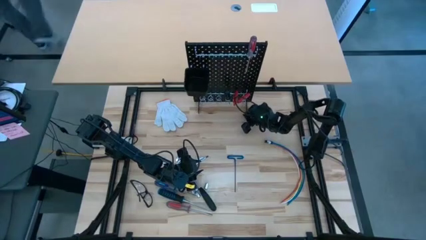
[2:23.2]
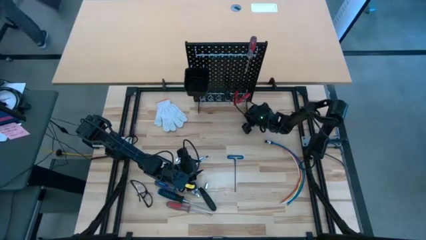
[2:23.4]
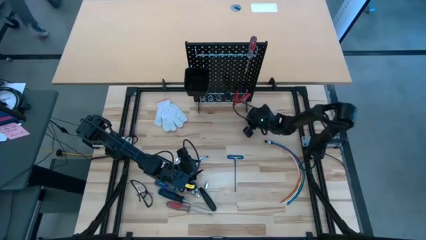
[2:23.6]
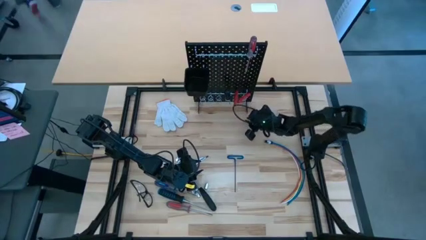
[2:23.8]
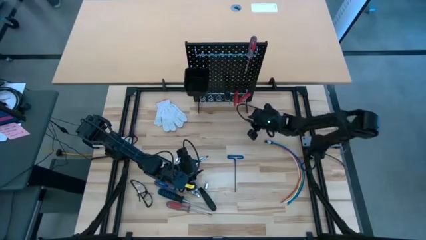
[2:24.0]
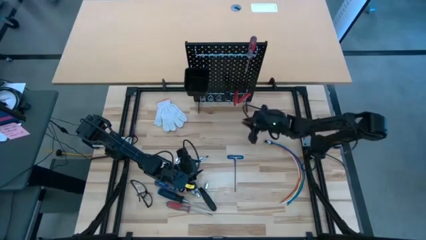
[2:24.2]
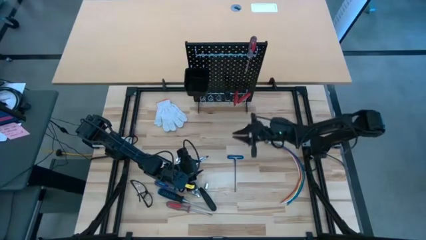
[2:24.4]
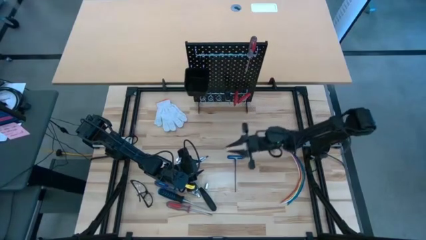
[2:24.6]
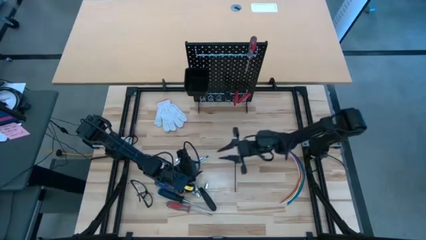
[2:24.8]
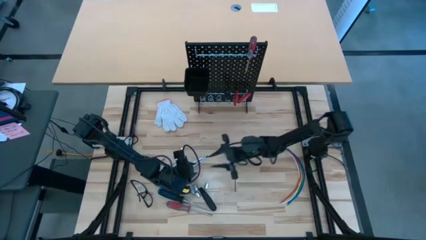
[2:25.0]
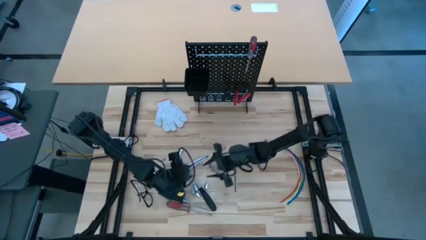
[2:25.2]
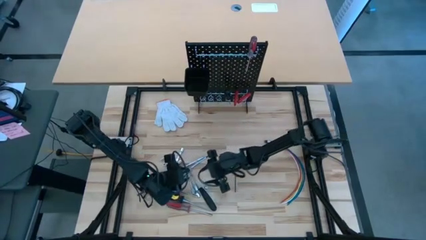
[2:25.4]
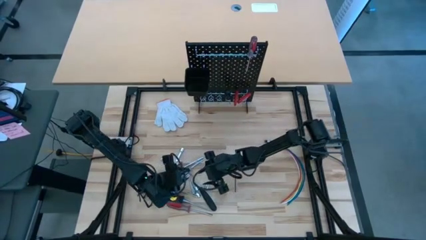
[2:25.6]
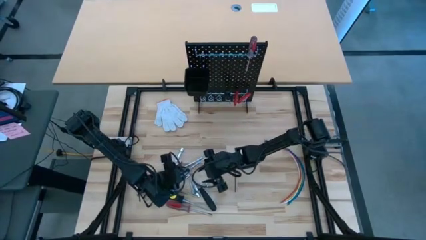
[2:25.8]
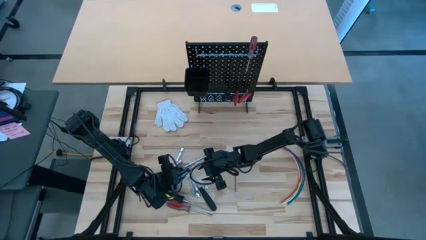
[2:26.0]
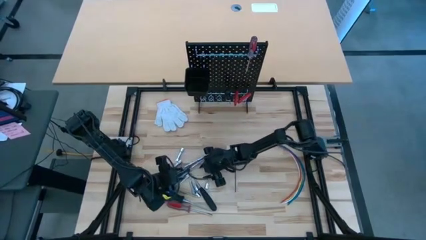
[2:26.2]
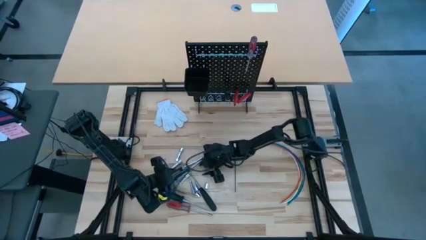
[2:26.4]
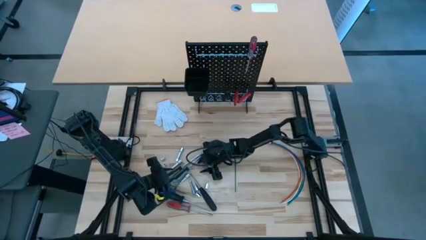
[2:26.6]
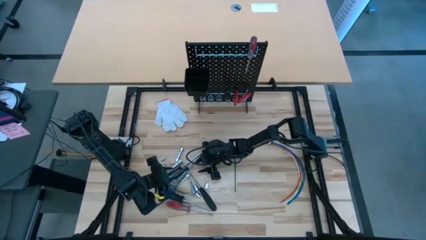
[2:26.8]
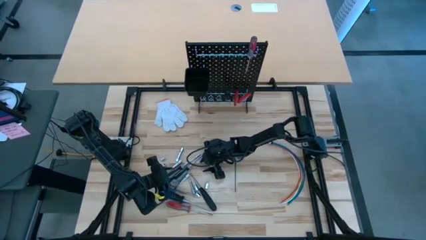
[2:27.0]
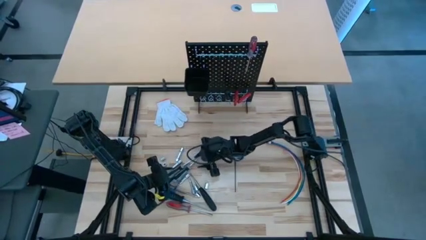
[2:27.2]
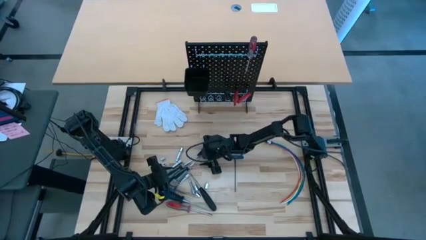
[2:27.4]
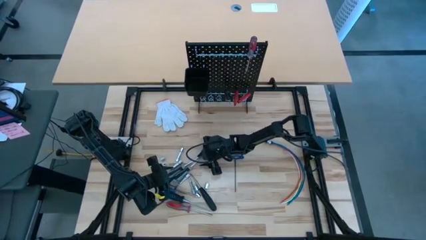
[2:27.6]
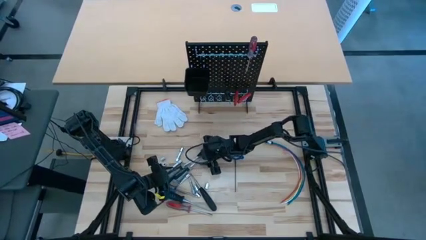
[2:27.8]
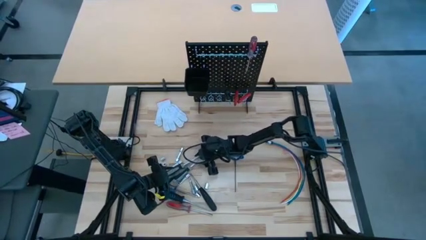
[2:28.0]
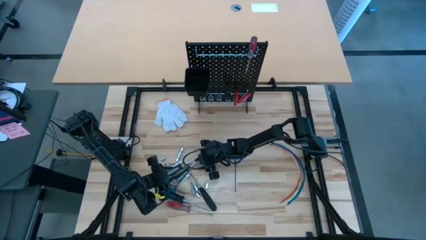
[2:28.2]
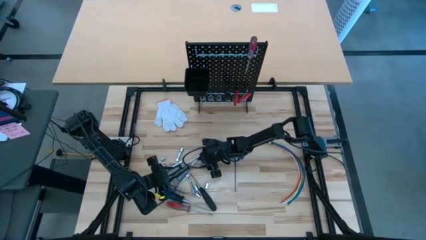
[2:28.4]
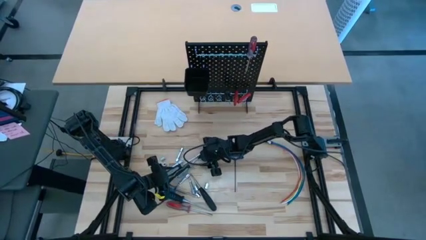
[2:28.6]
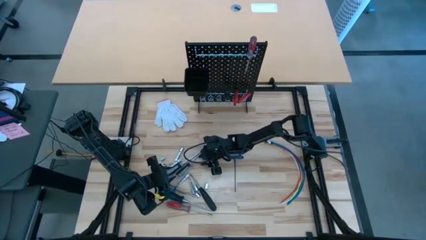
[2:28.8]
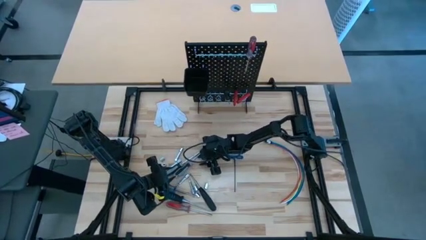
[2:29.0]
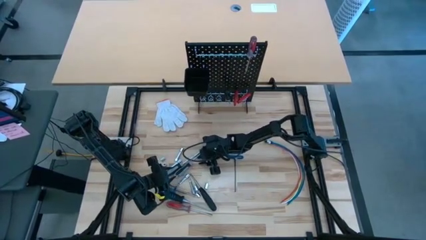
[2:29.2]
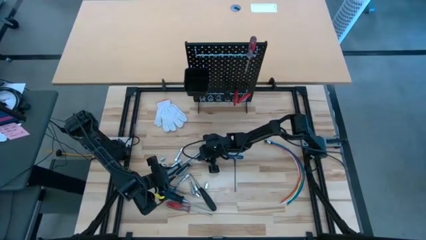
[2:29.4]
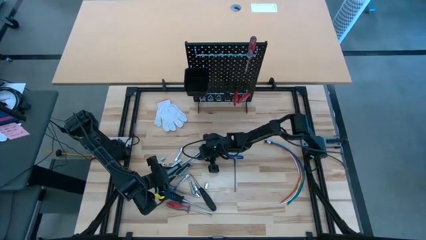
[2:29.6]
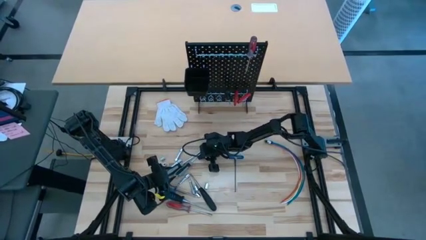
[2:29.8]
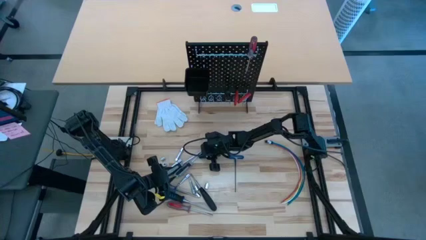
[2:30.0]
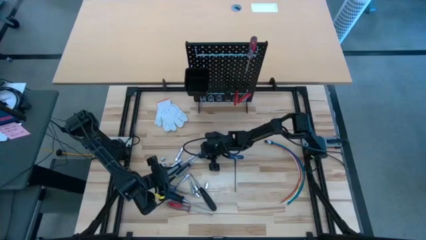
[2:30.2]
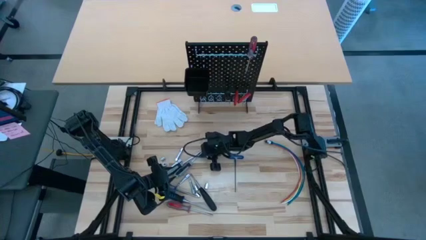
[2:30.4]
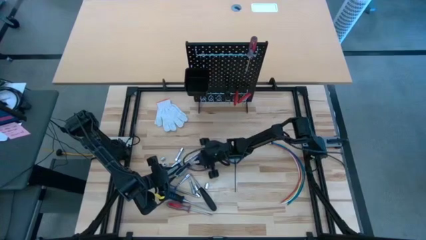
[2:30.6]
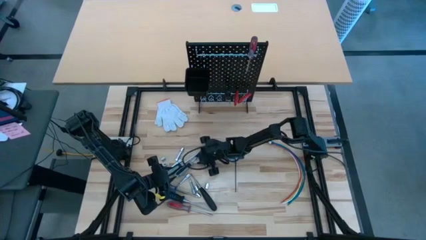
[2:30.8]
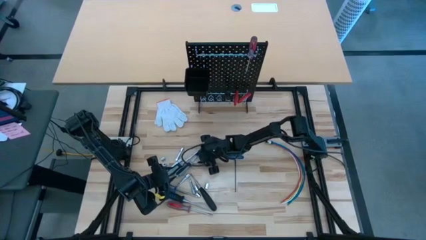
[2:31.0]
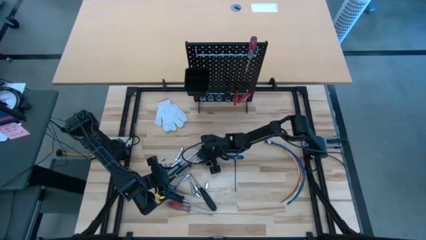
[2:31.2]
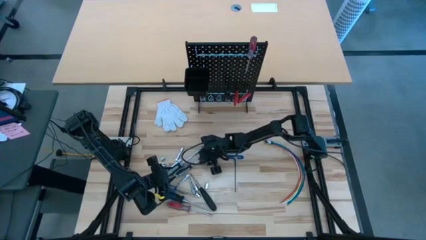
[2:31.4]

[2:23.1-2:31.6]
Task: Hang tools onto peg board
Hang the grey screwdriver on the pegboard bin

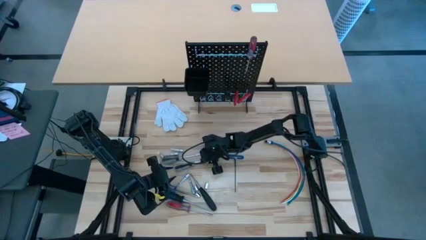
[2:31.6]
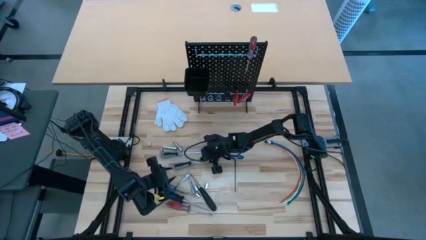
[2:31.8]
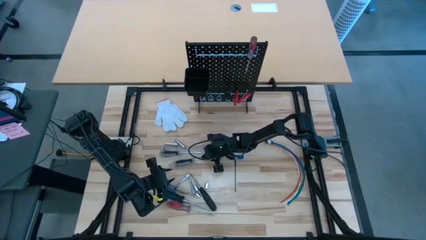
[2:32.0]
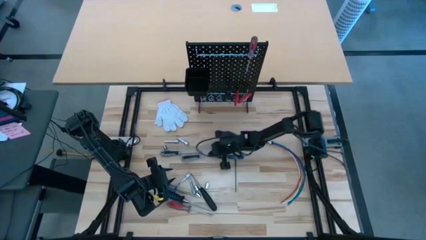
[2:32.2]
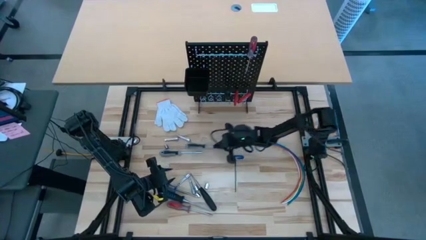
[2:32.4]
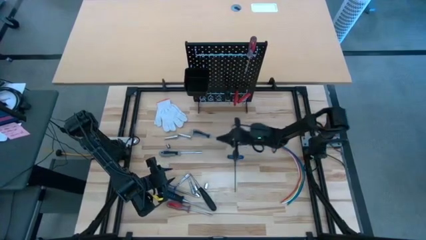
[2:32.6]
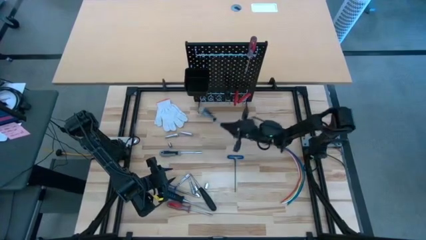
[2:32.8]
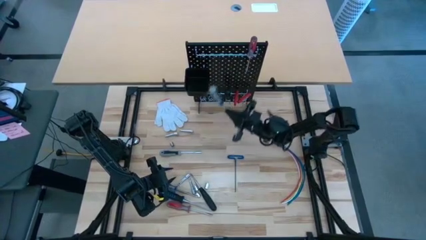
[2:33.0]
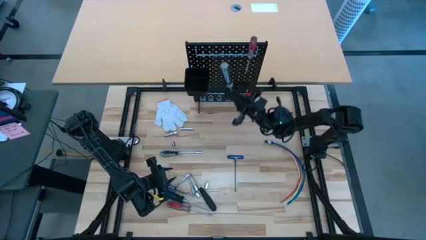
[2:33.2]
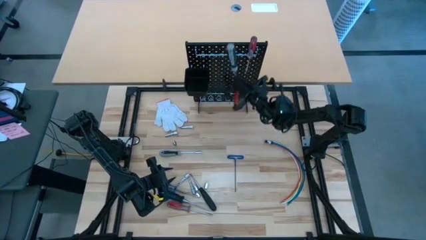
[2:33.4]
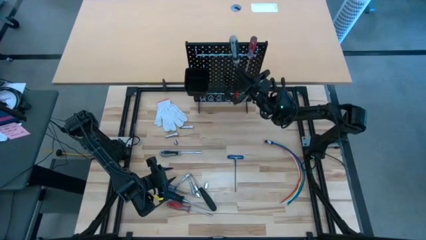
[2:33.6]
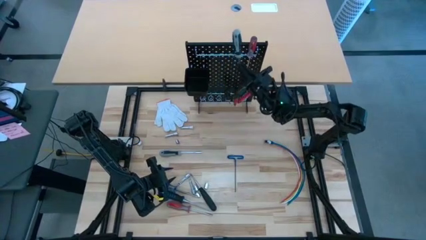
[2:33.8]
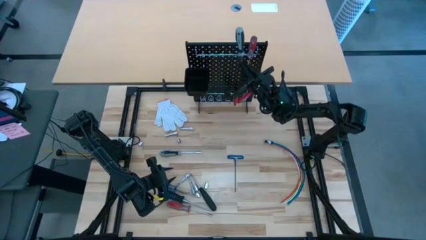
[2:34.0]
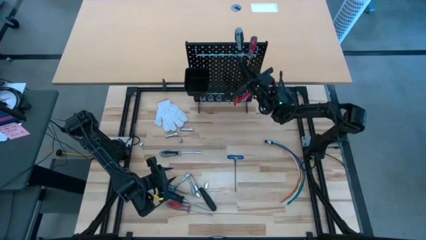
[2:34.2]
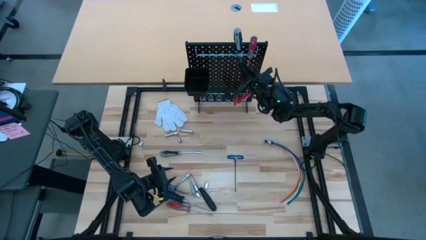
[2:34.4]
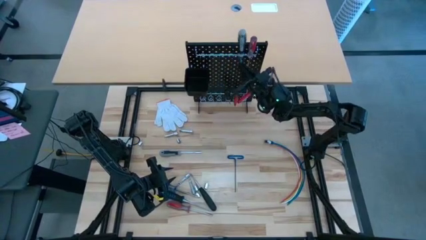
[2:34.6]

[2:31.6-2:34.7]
Hang the grey screwdriver on the pegboard bin

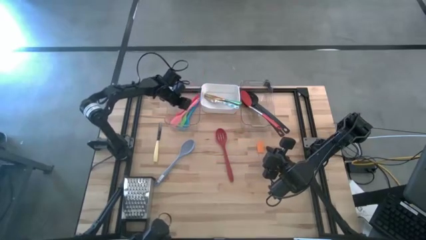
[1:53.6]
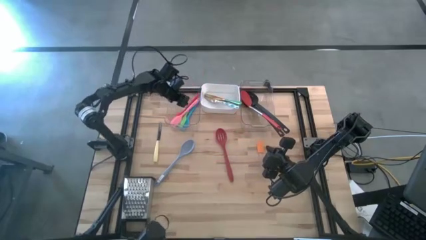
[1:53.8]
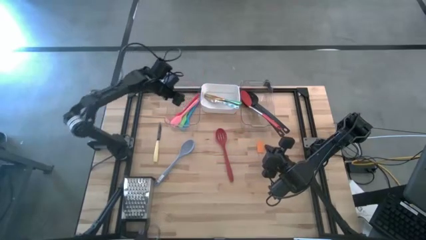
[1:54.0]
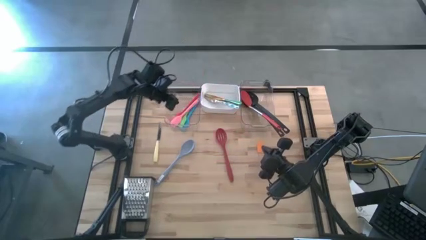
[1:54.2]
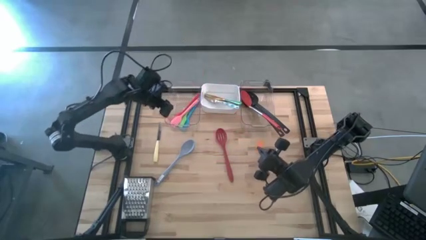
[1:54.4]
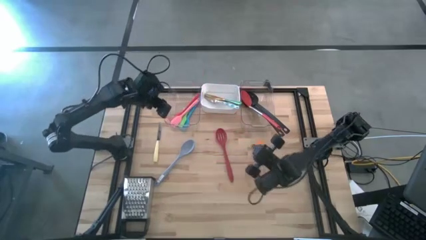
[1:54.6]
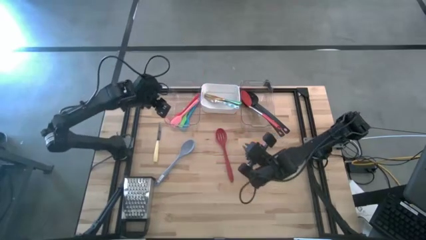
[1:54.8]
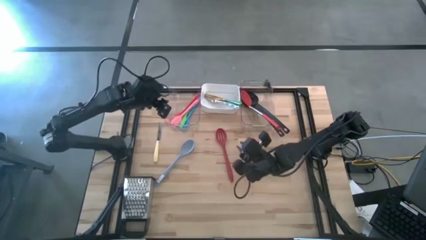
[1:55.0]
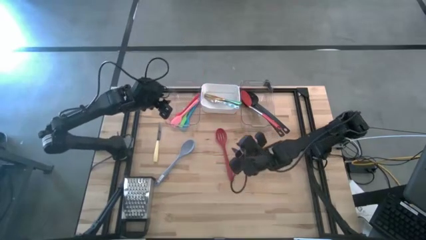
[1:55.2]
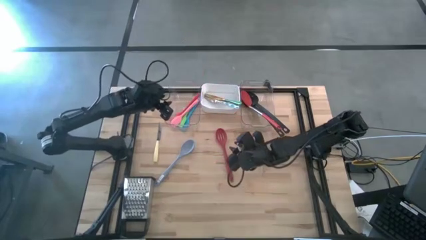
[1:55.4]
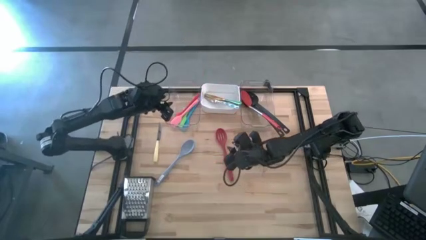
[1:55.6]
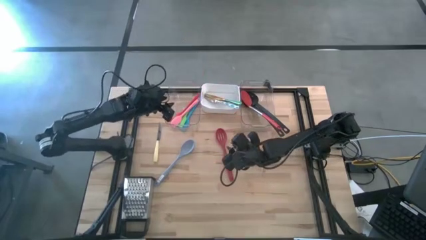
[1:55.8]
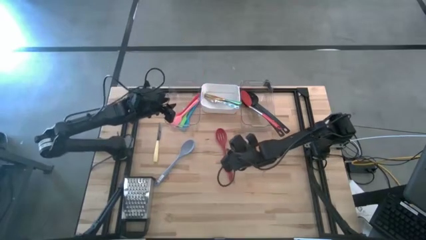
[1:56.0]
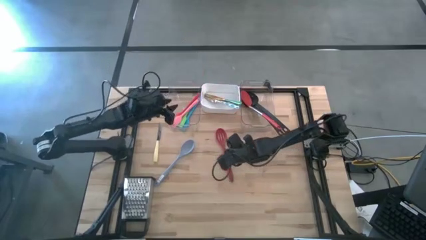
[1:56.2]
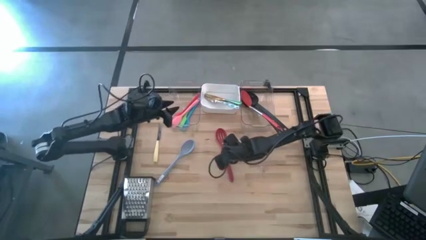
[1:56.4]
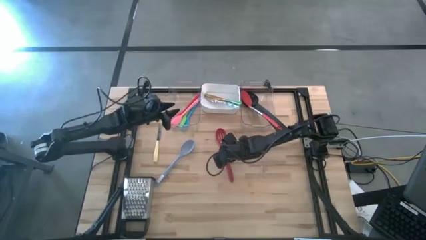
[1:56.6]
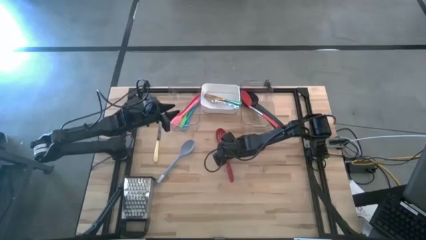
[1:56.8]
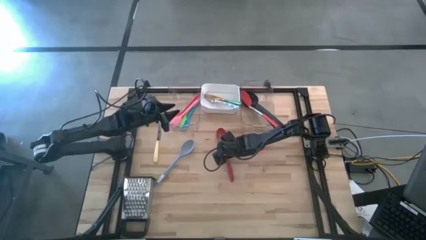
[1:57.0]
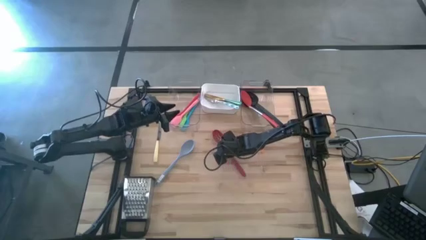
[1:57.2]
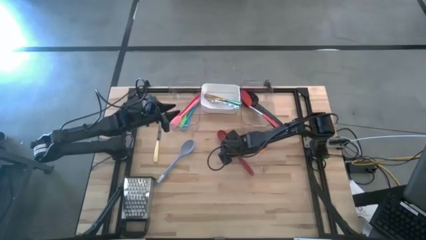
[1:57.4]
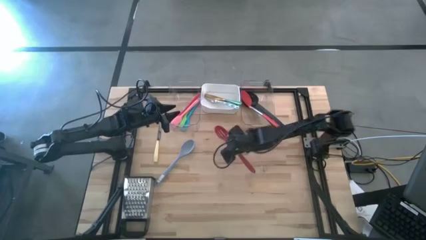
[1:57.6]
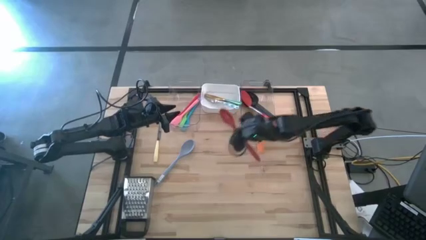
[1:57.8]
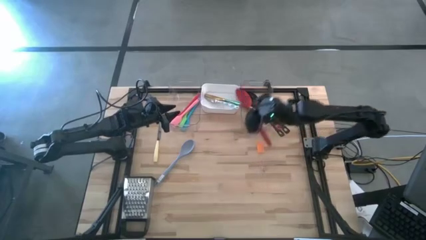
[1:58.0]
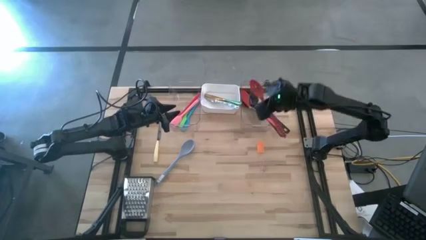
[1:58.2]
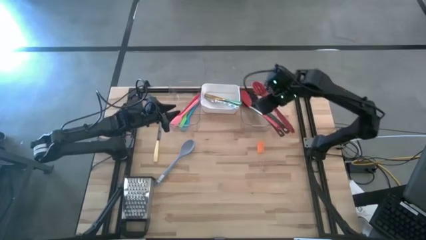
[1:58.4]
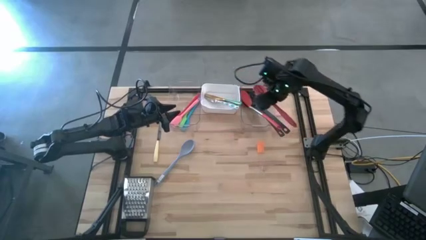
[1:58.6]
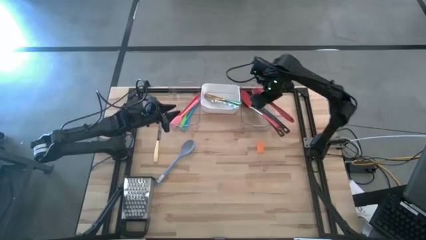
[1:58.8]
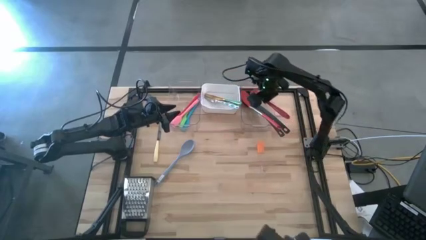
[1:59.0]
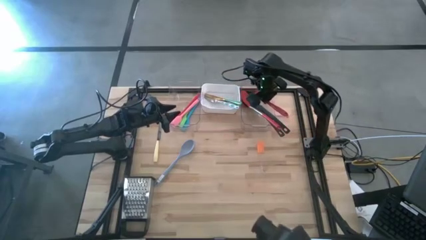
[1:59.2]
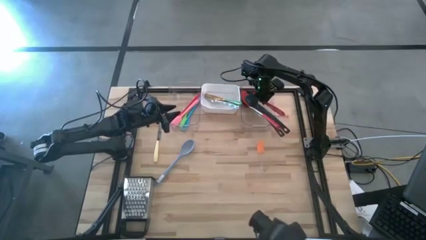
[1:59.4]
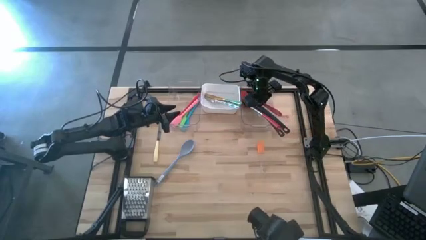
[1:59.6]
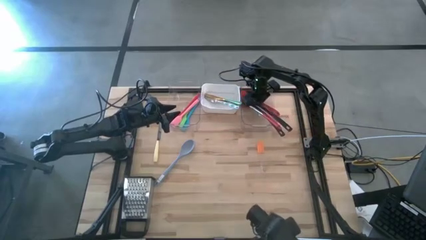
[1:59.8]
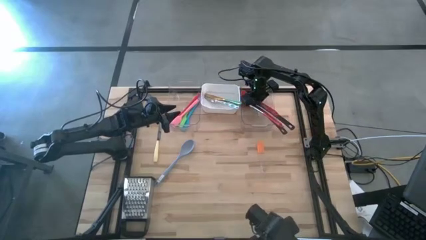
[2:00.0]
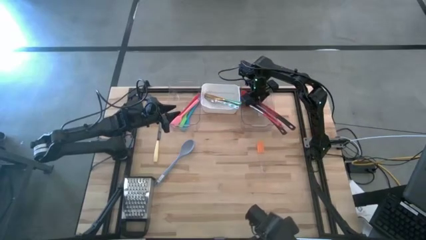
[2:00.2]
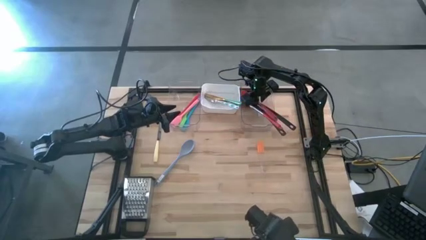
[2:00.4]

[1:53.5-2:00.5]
Task: Pick & Place Kitchen Items
Put the red serving spoon into the right transparent bin
